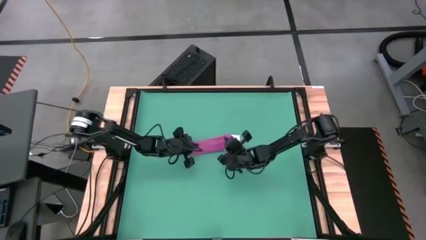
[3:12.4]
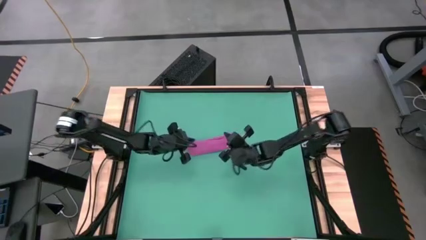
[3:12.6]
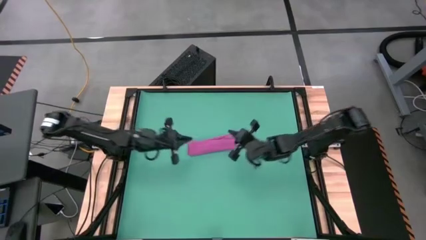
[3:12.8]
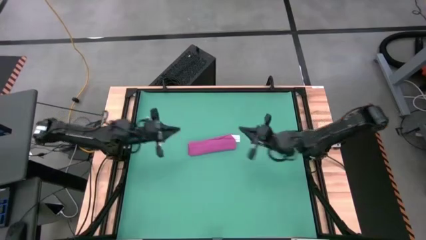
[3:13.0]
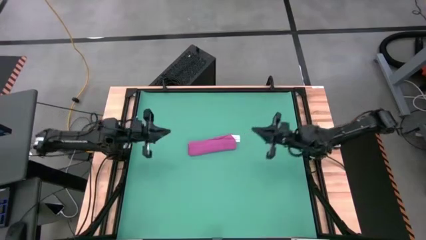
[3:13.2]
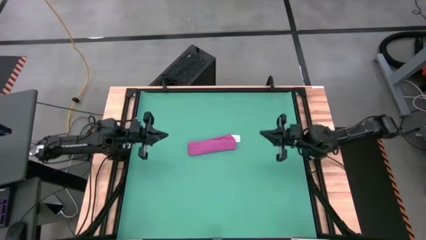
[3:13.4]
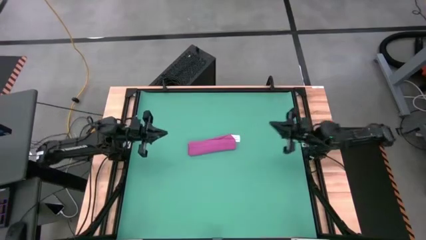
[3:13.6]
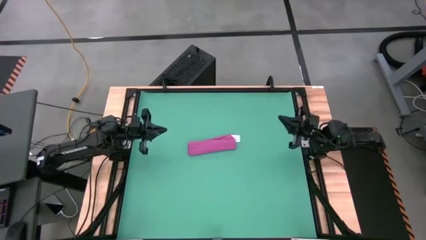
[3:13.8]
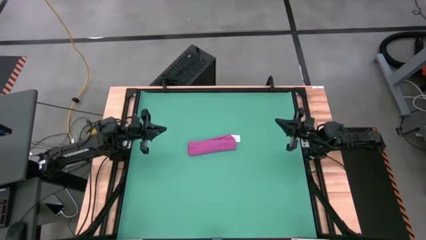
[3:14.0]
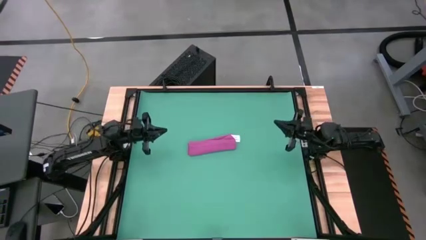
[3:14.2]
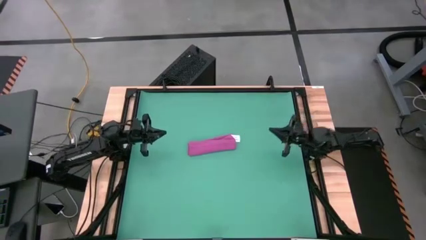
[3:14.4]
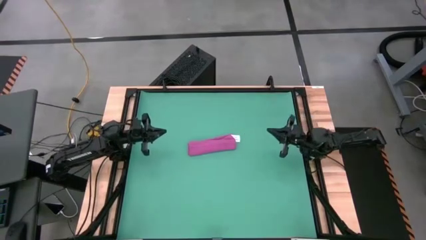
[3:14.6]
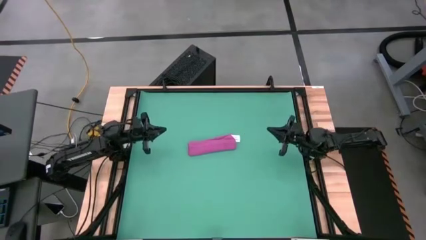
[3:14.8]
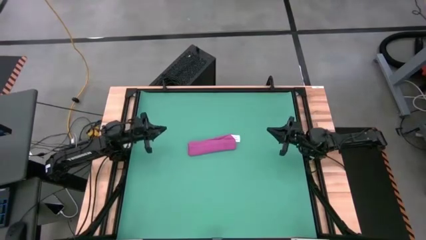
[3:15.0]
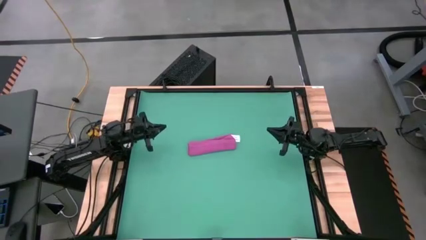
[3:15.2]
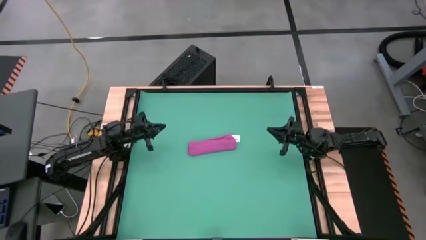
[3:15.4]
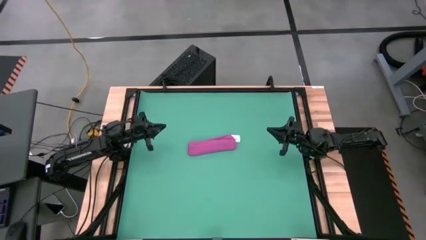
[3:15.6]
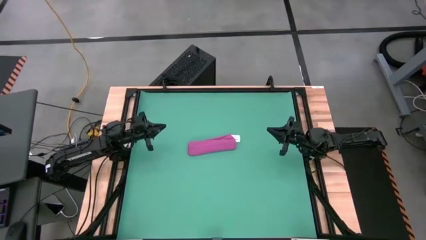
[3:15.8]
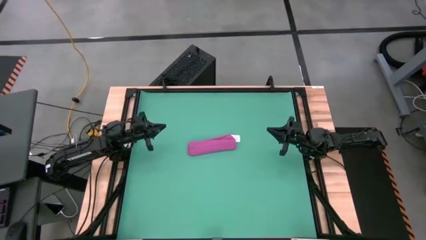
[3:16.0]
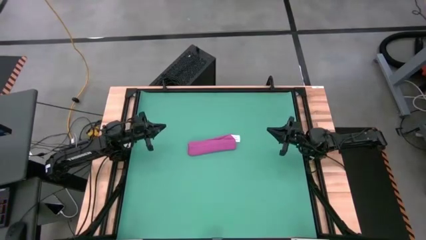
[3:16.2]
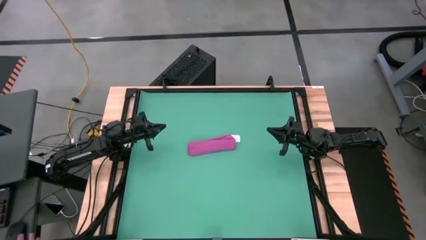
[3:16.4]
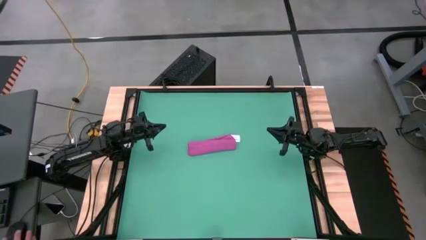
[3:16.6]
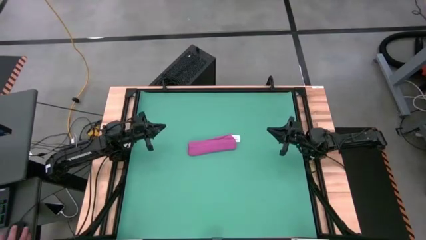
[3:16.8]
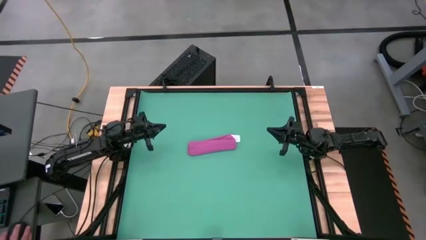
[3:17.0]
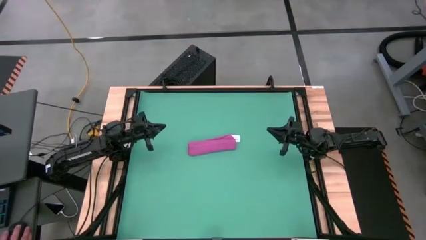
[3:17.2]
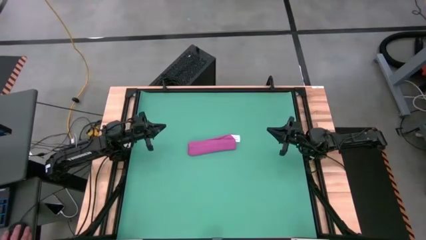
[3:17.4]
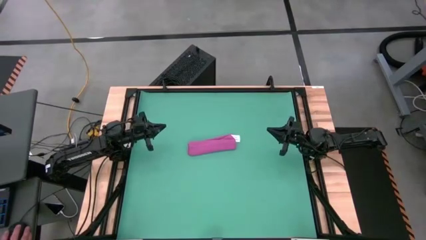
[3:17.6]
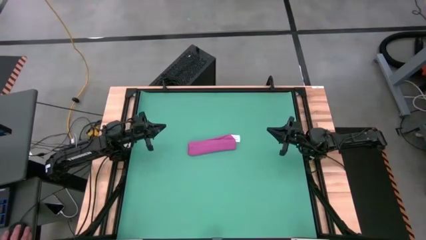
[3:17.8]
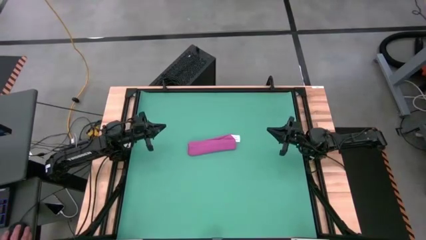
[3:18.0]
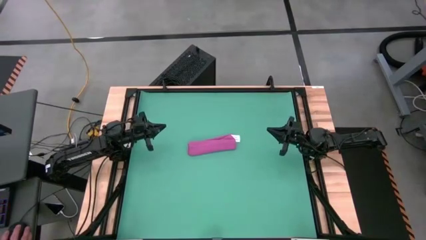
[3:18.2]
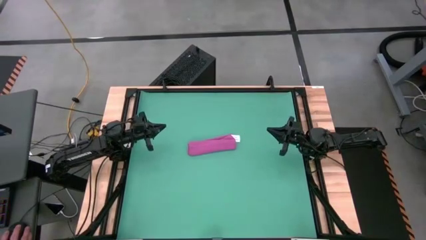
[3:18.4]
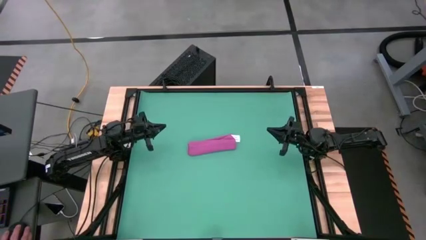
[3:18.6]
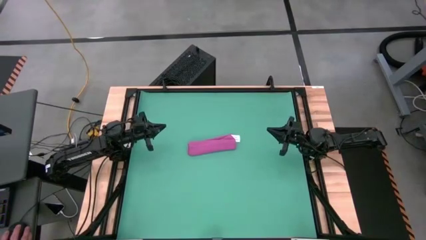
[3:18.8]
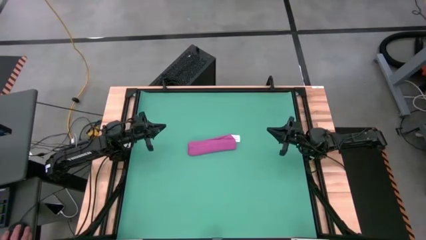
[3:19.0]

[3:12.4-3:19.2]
Task: Roll towel into tight, uniform cylinder
Return to Home Position

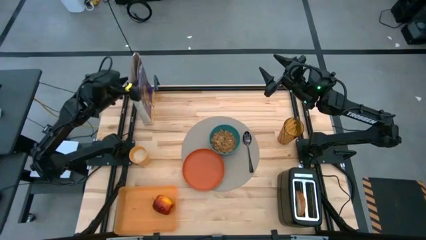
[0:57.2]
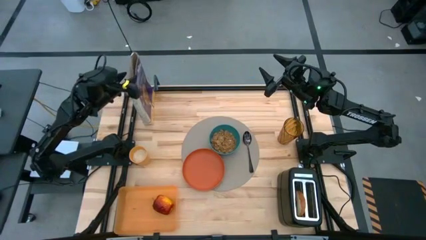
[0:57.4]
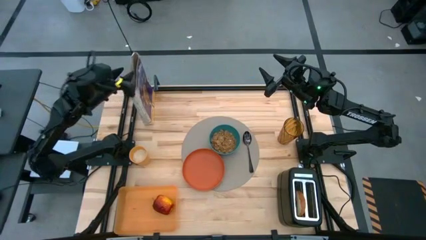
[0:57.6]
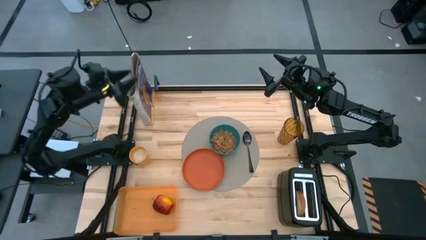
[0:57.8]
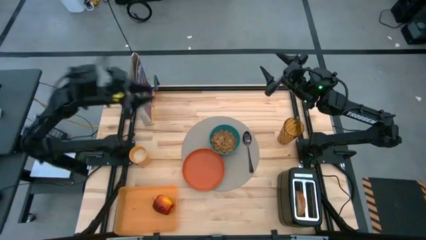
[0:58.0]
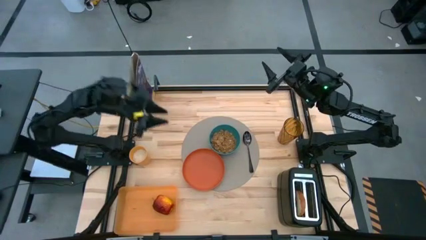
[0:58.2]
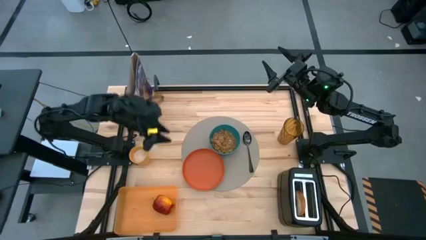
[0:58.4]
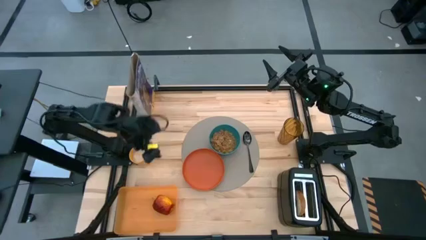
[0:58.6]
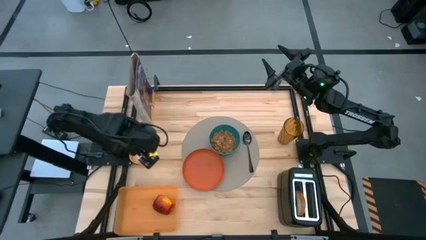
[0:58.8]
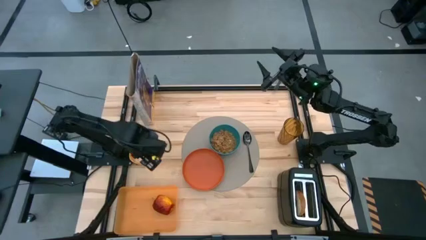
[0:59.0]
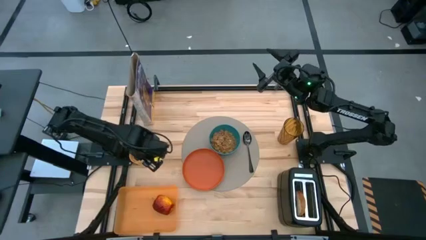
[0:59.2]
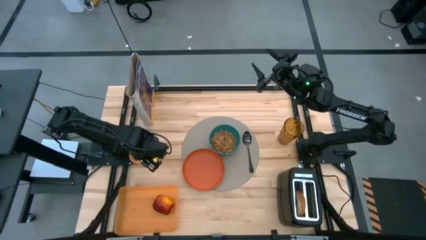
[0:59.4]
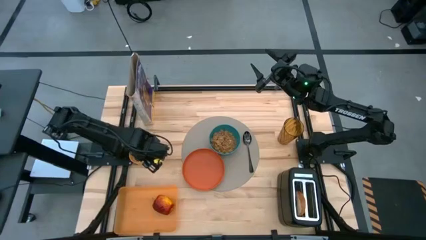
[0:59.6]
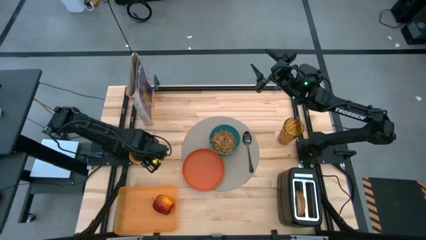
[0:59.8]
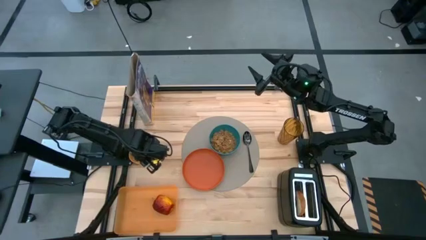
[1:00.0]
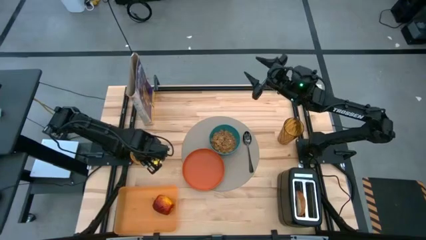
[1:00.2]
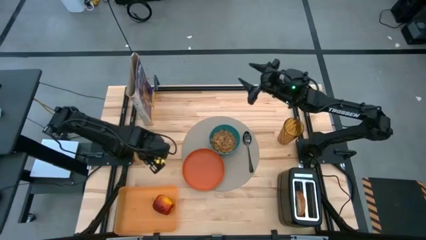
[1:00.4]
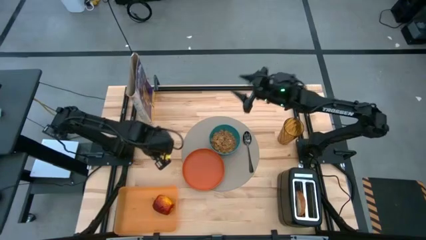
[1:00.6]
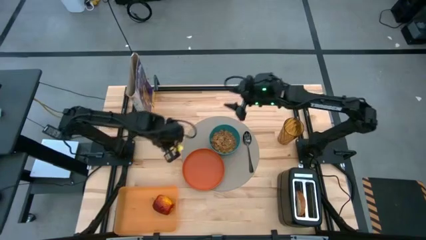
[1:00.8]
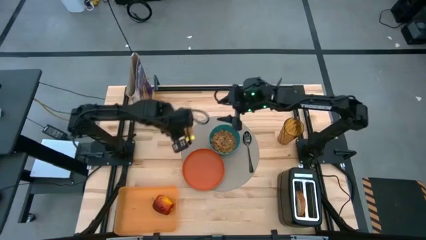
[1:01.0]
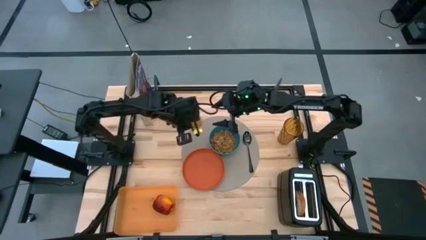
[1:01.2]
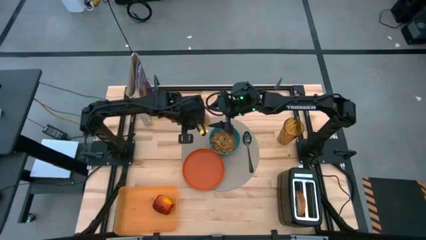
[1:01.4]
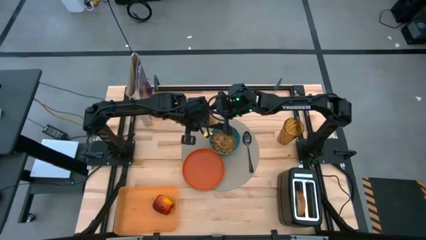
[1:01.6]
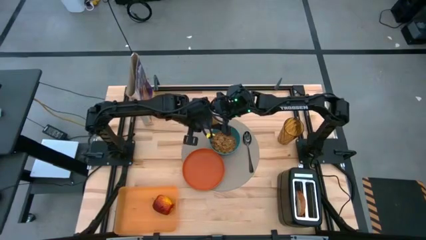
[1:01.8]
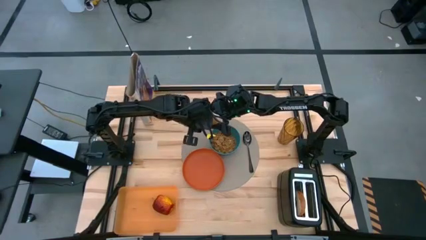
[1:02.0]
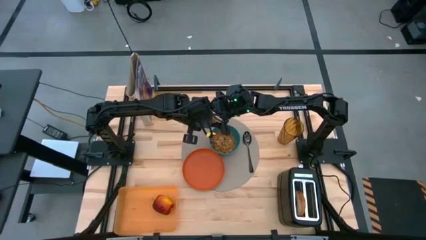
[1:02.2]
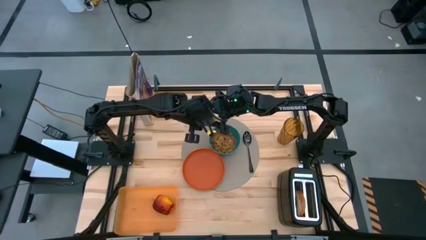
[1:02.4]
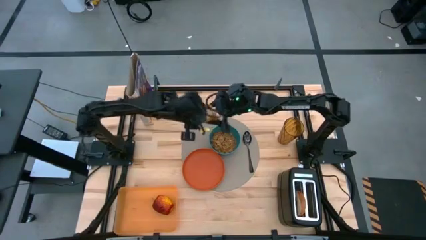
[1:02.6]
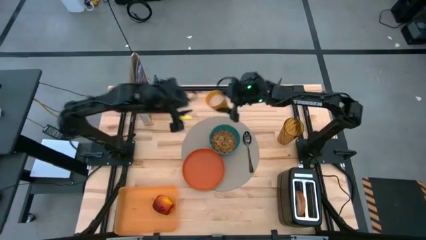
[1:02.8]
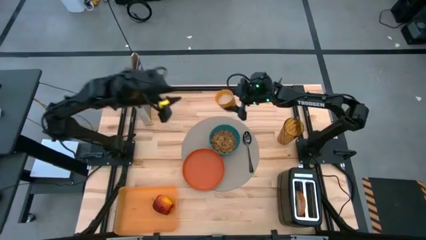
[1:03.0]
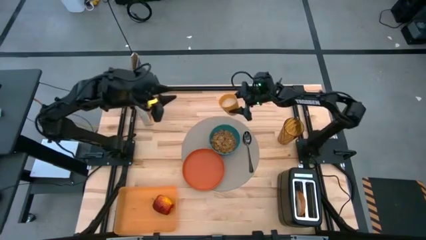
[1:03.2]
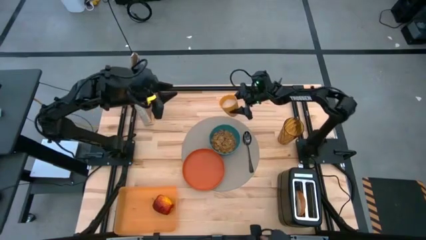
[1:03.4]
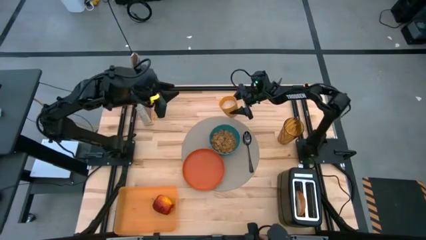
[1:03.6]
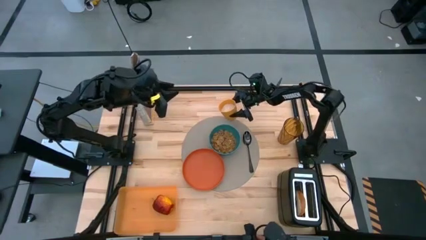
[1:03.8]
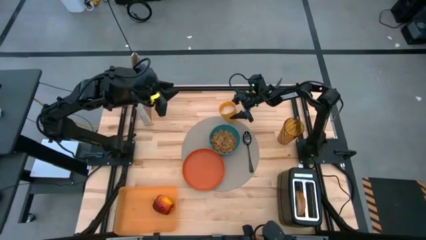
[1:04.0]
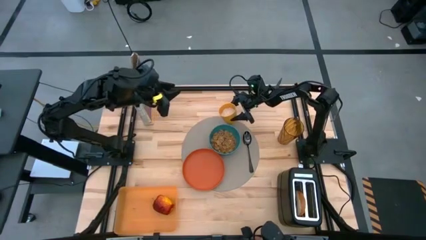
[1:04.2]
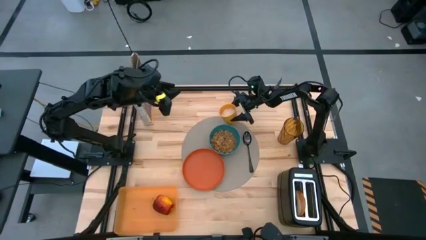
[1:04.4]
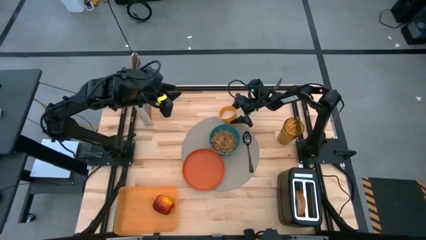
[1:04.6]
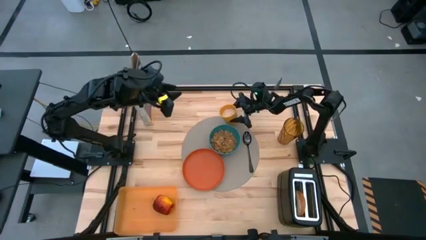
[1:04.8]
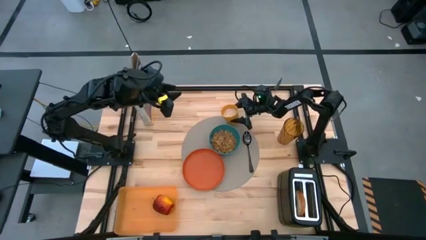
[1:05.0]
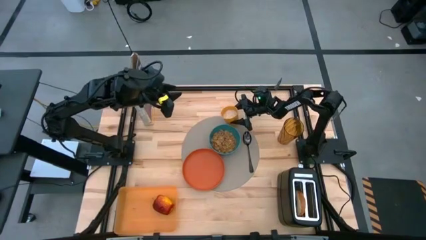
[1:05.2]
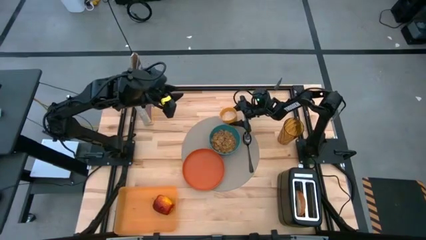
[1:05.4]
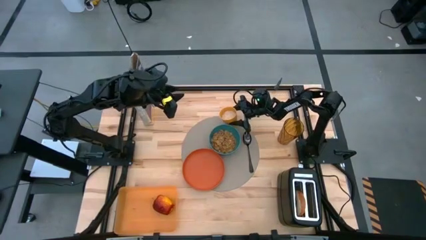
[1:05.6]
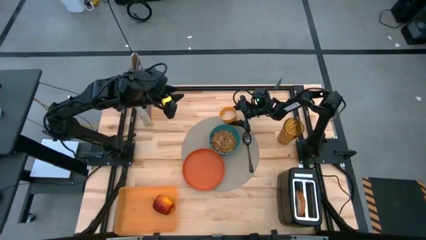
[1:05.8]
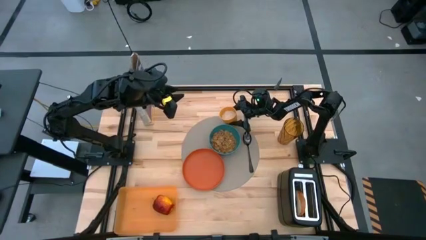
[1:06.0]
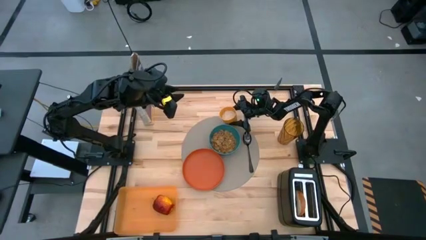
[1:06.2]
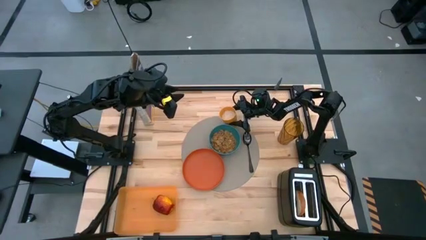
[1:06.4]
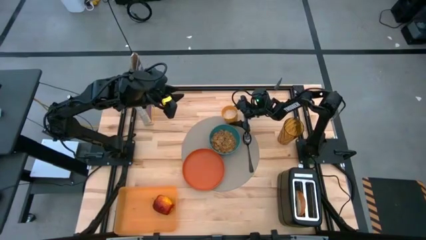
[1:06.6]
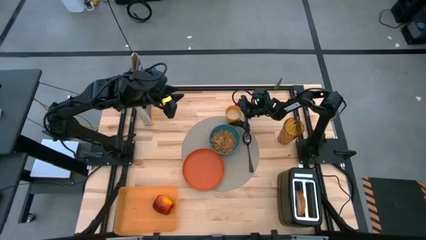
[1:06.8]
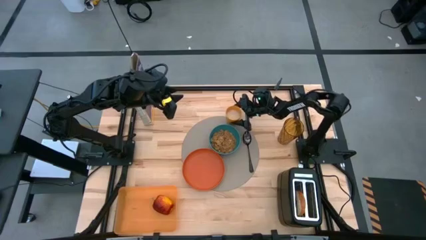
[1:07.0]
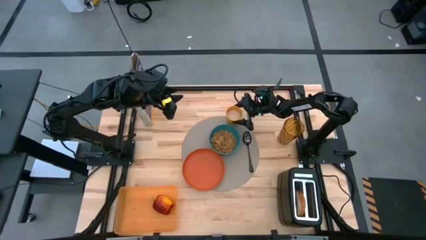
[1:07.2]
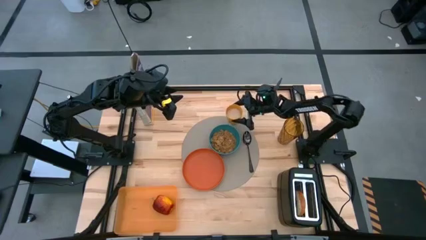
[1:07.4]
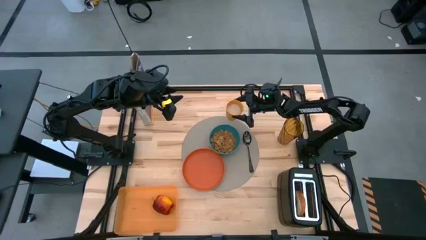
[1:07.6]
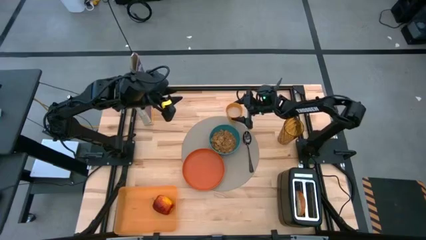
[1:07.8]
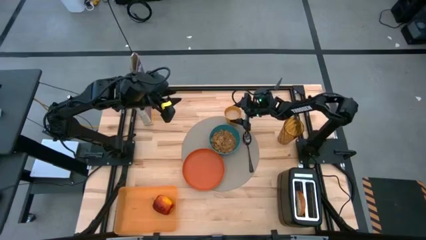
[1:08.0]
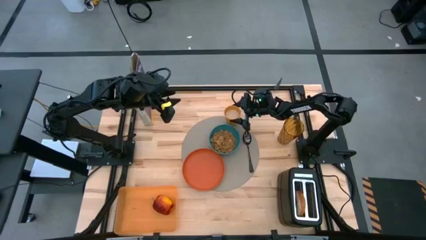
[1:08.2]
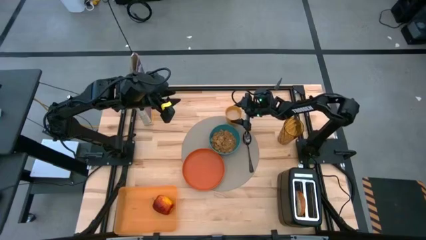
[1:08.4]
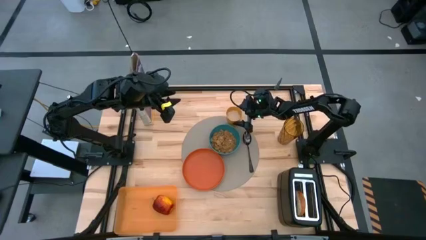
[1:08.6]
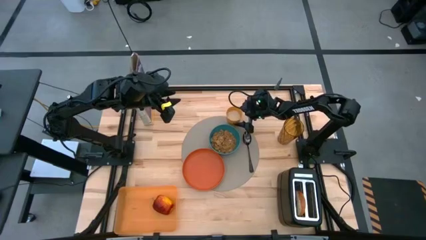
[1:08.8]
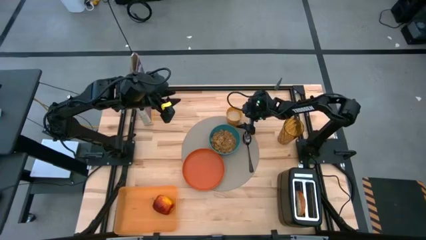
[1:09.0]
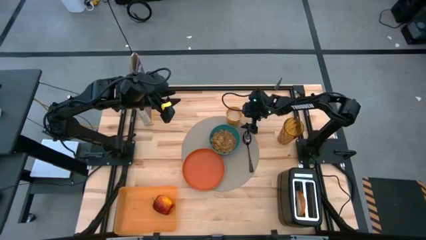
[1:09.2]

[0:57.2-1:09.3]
Task: Arrange a breakfast setting
Put the yellow cup of milk on the placemat on top of the bowl
